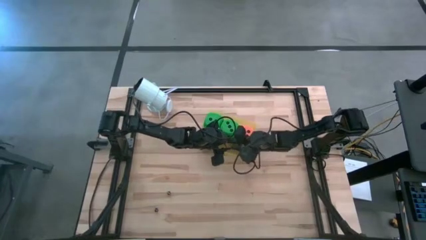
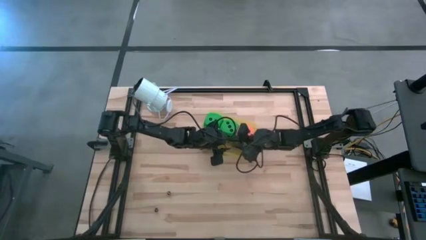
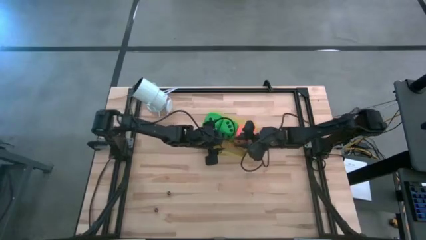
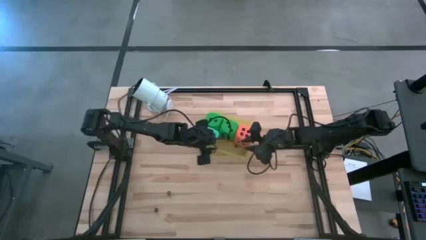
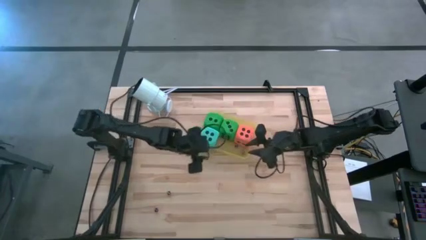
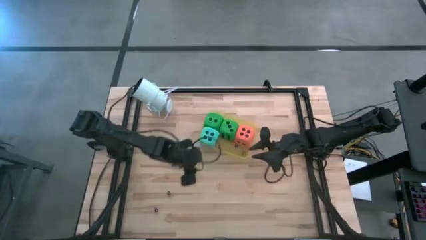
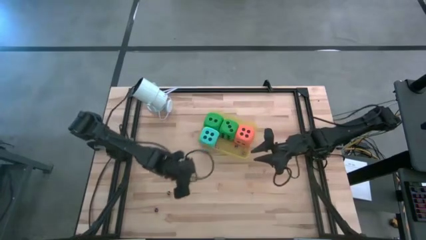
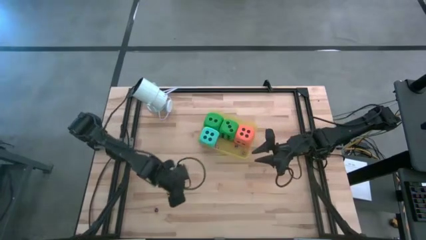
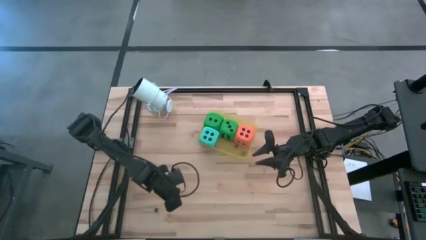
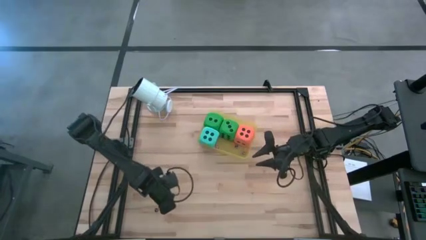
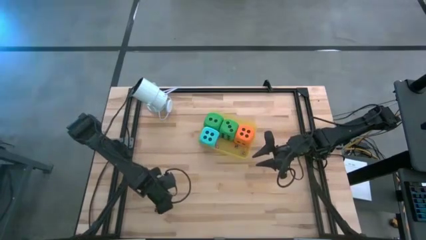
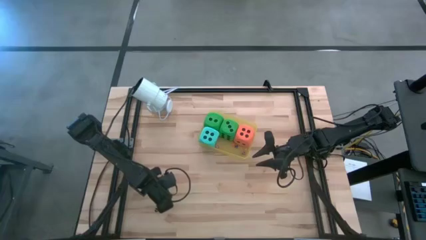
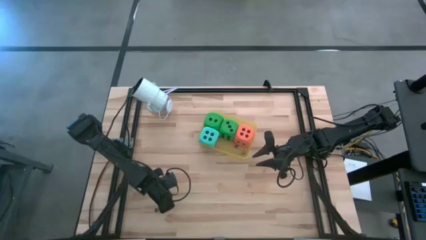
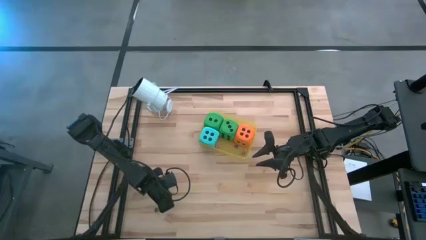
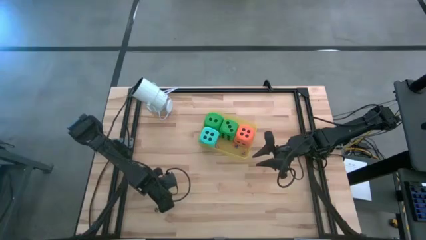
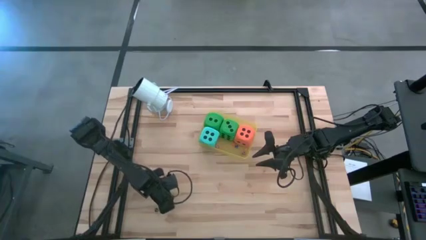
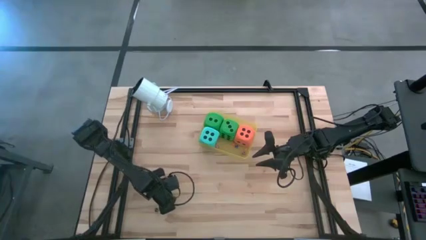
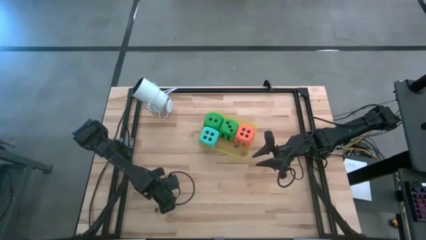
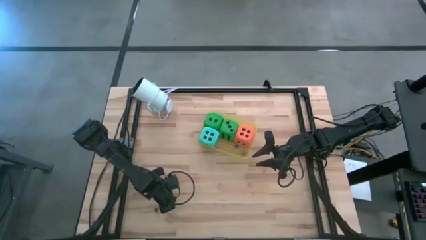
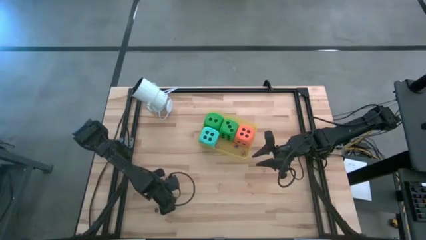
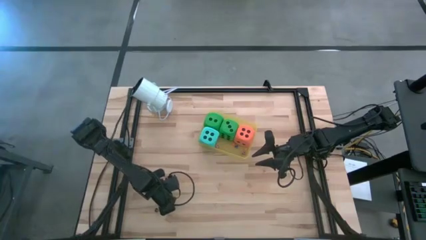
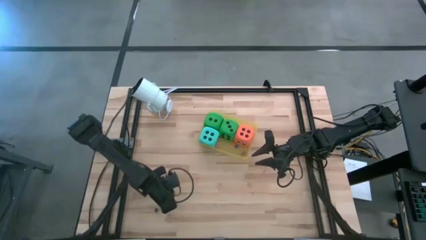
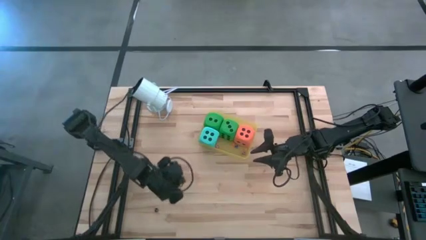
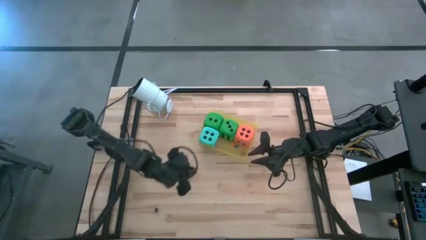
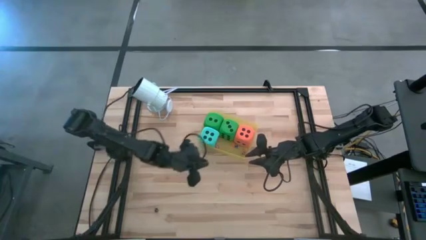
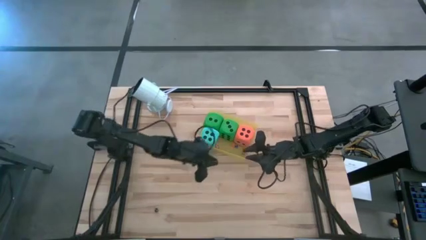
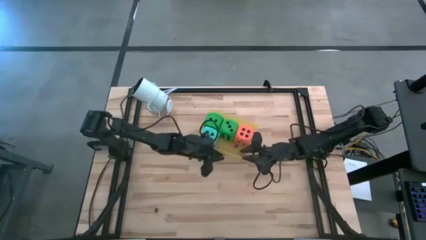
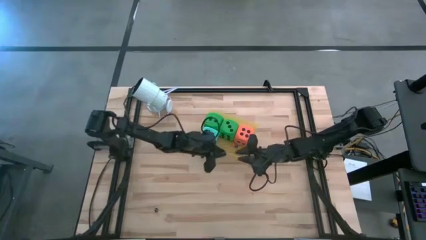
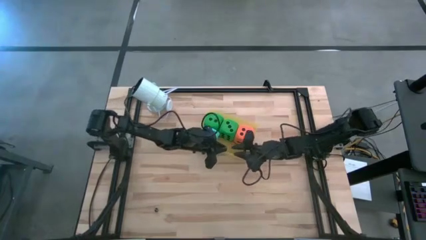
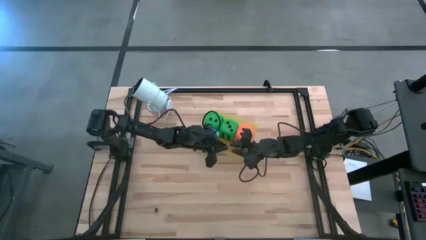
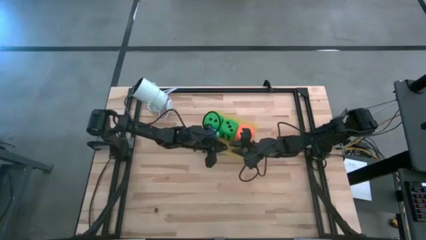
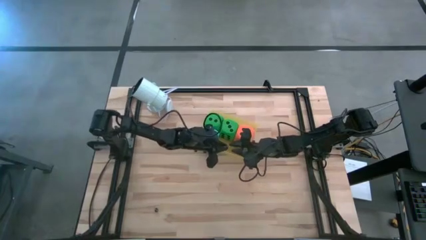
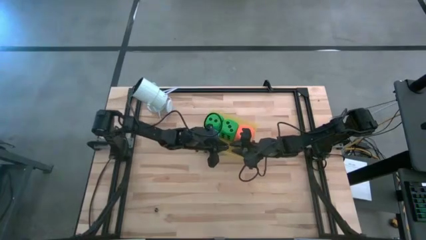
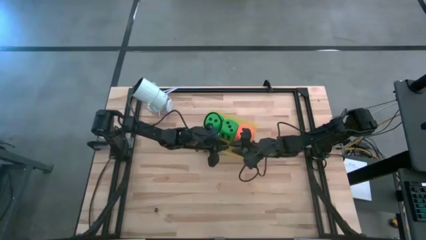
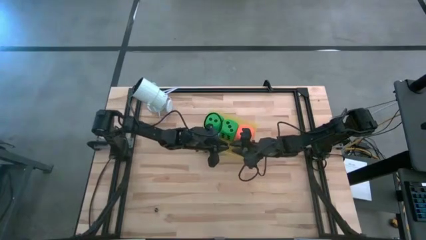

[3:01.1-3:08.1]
Task: Pick & Place Dice
Put the right small black dice into the yellow bin

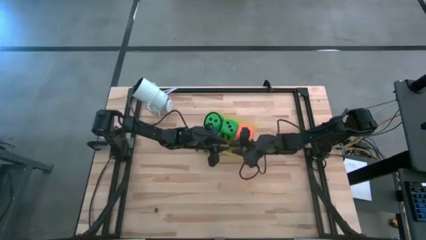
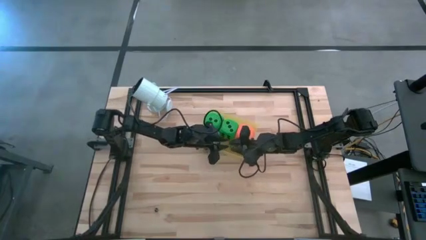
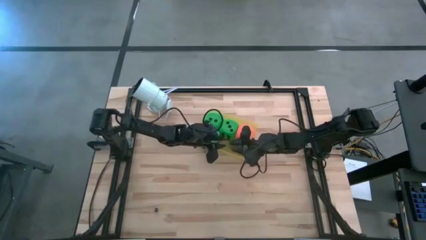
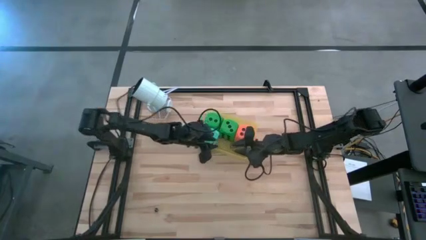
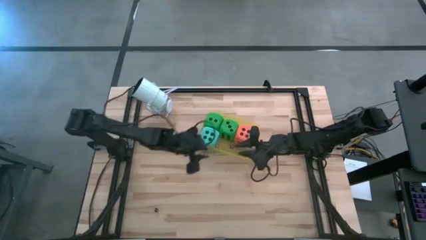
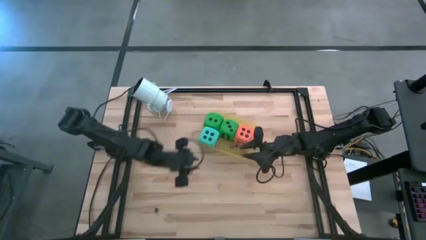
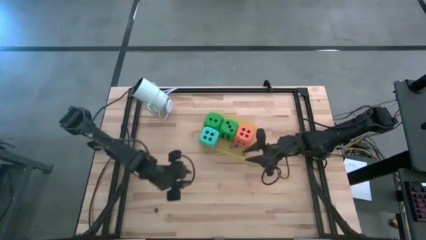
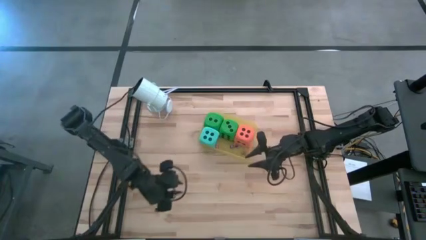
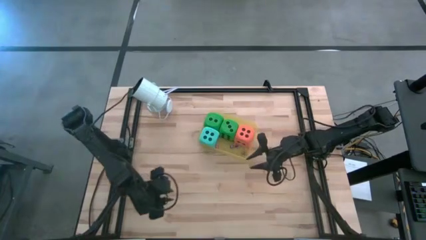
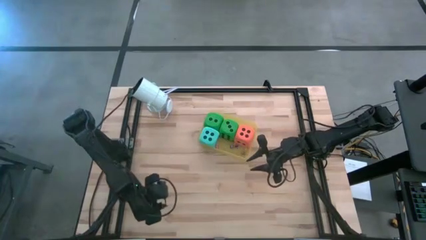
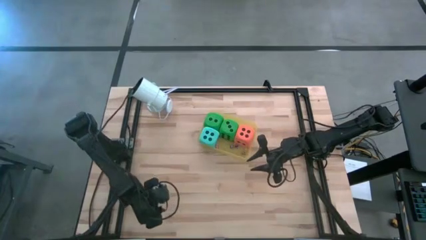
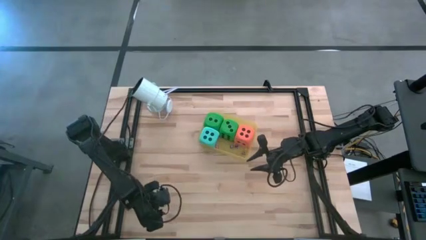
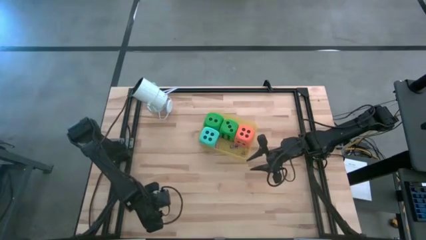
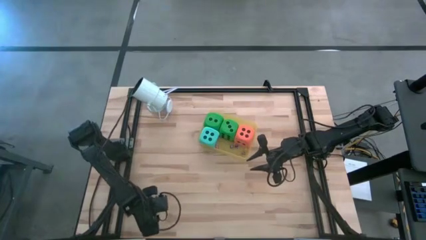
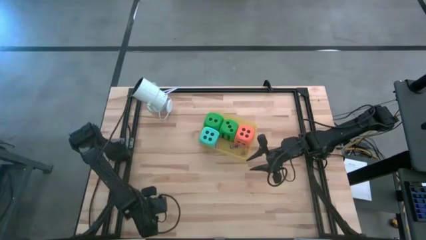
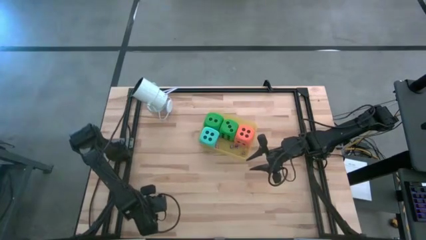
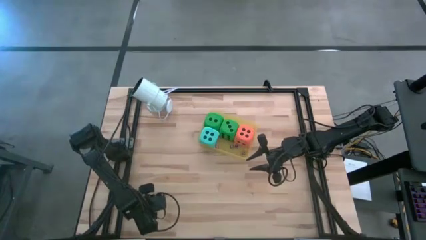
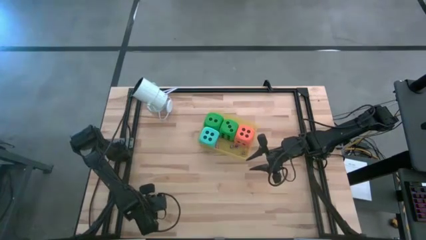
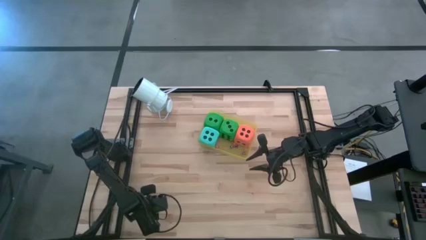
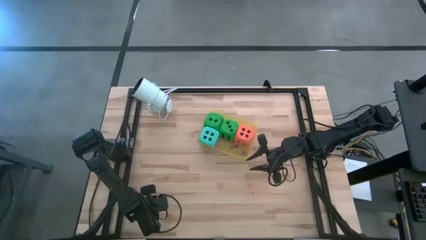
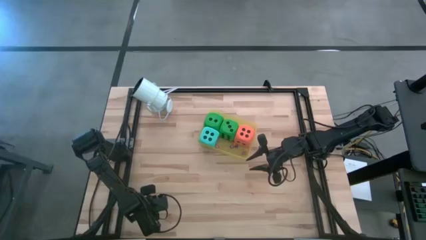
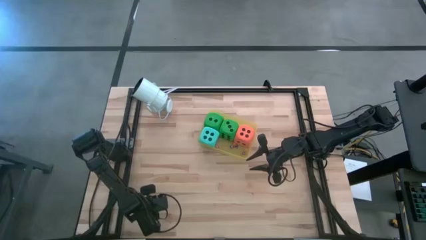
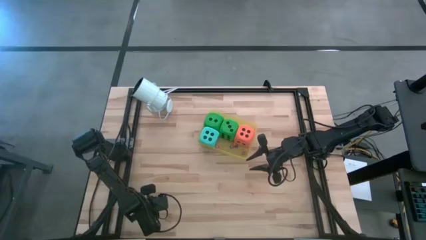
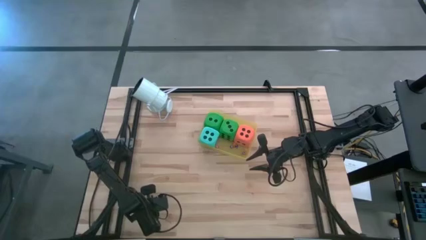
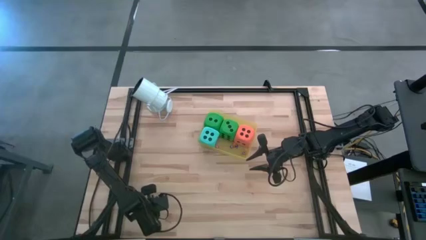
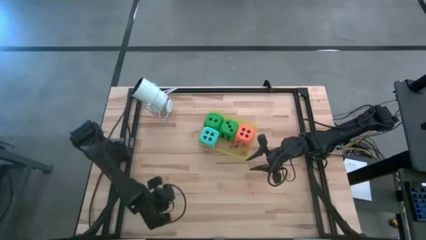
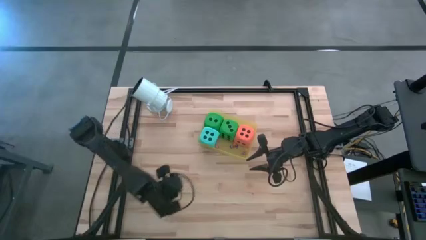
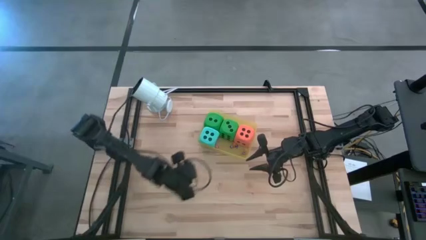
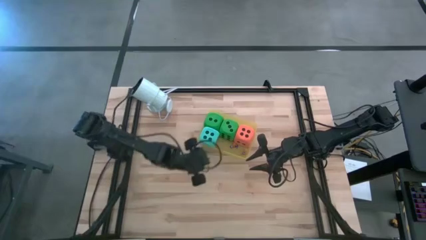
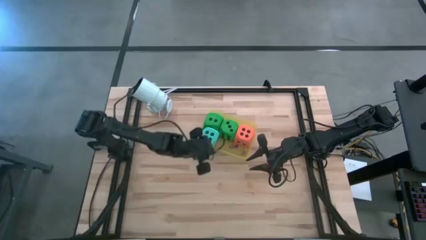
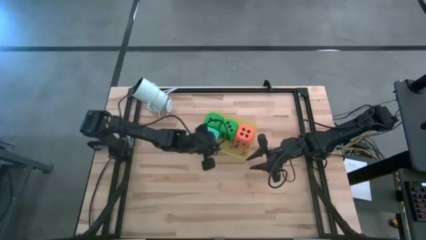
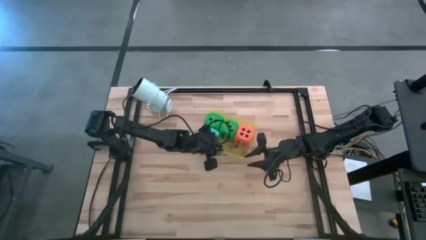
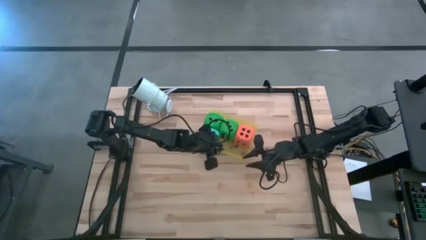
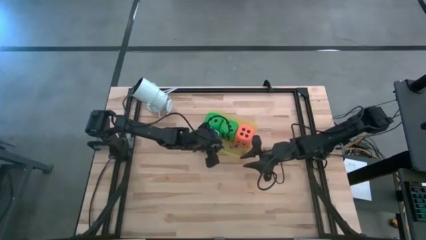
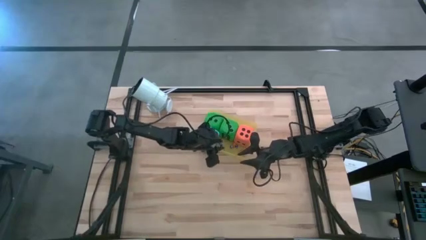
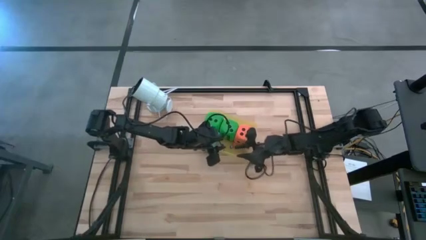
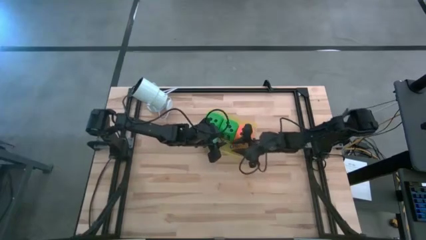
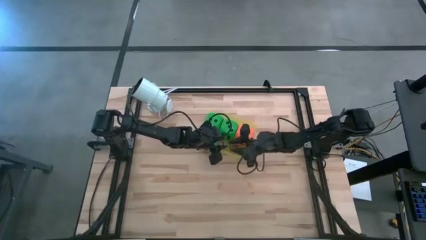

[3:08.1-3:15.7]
Put the small black dice into the yellow bin

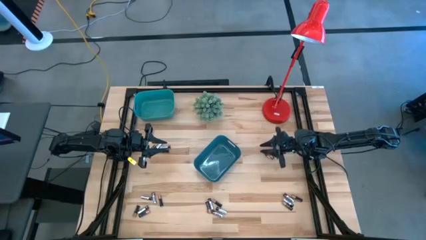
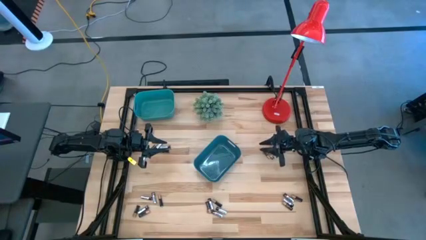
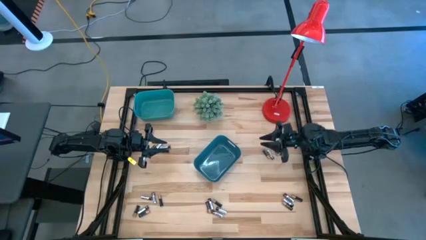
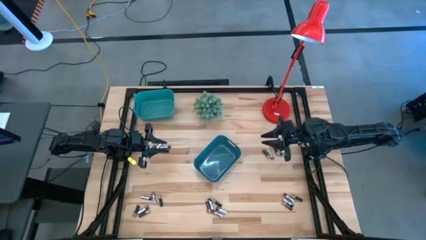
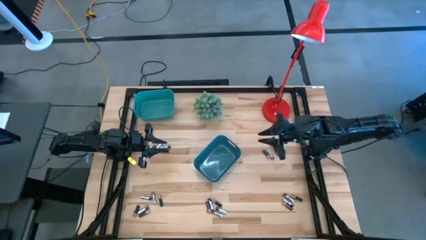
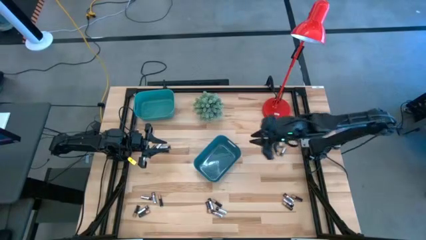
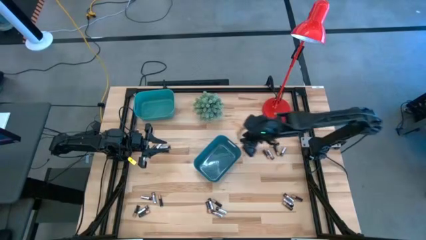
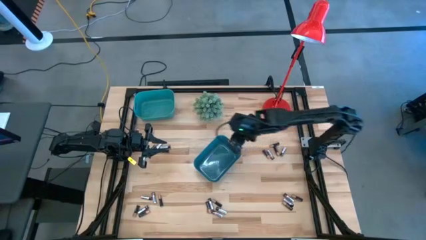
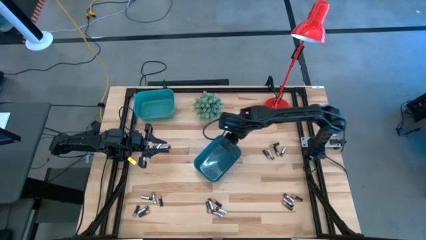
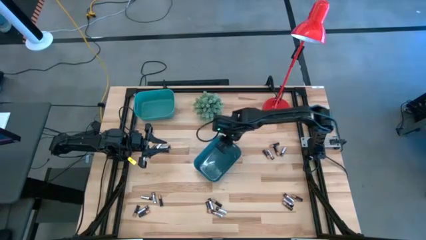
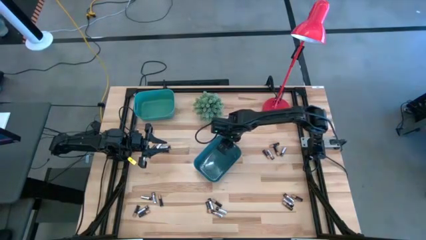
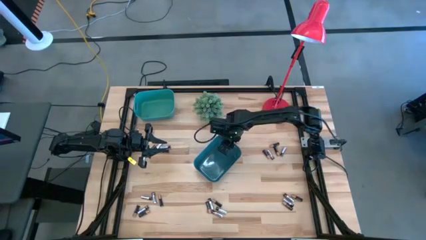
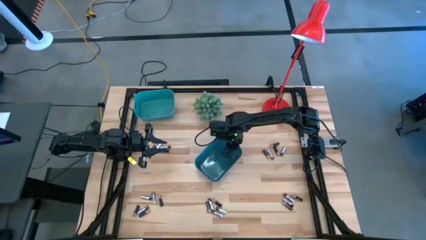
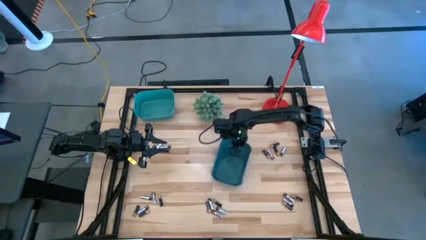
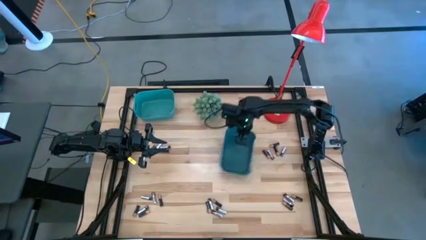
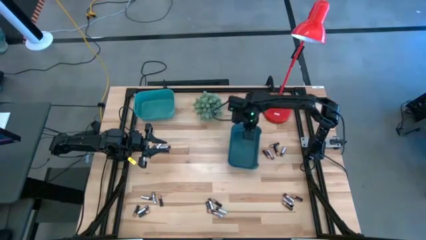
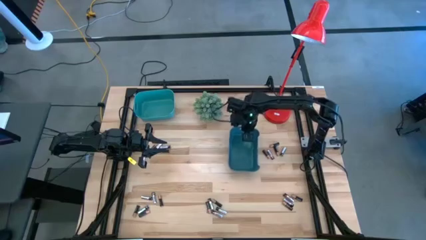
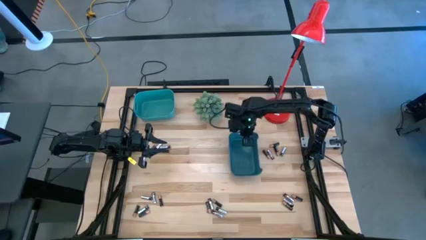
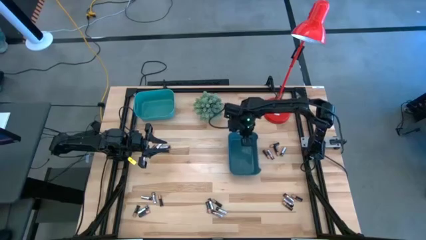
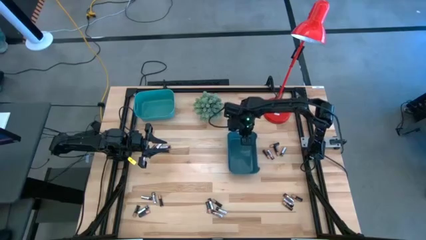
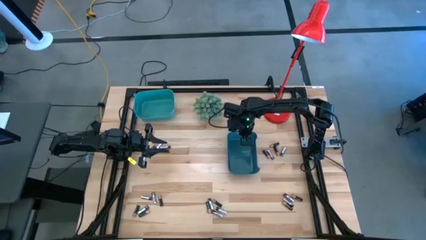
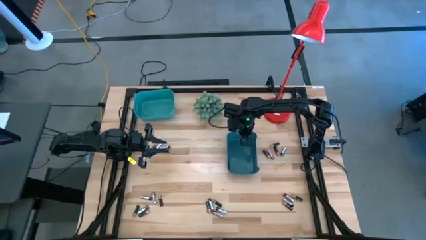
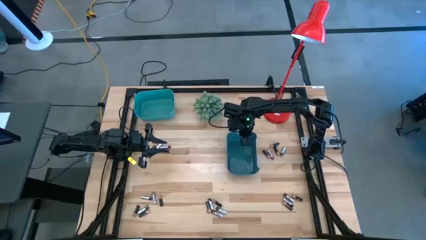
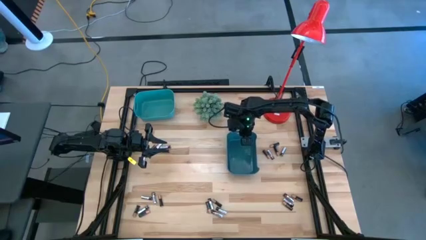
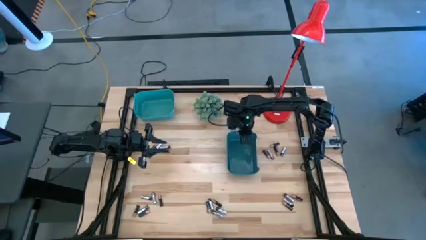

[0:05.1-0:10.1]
Task: Sort batteries
Adjust the blue bin on the table
